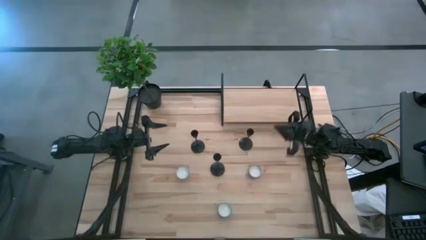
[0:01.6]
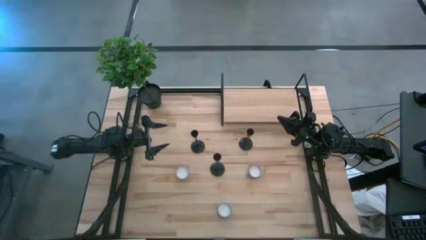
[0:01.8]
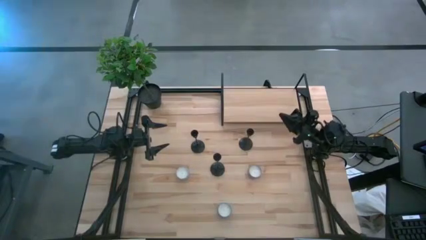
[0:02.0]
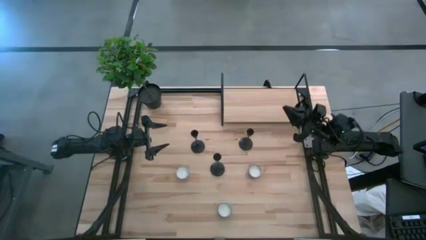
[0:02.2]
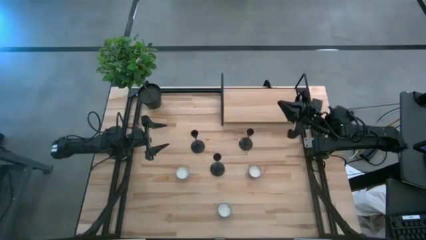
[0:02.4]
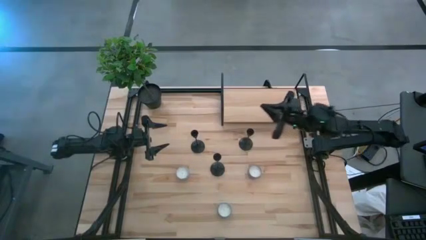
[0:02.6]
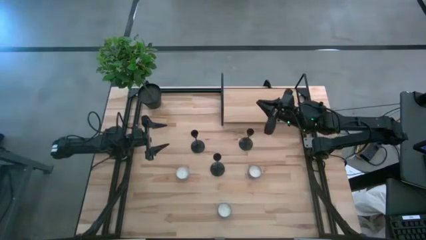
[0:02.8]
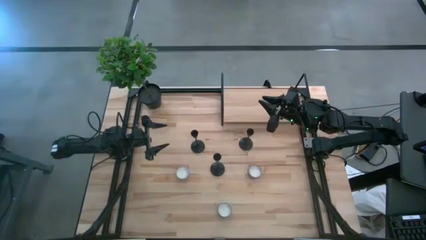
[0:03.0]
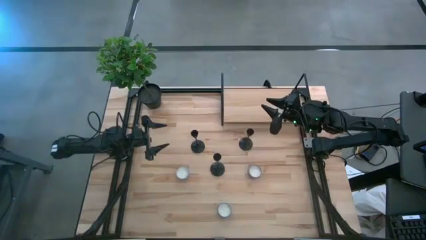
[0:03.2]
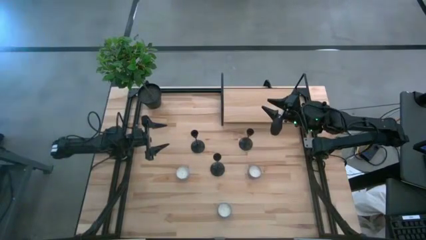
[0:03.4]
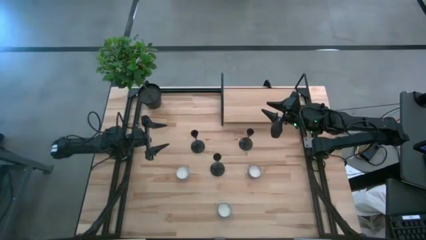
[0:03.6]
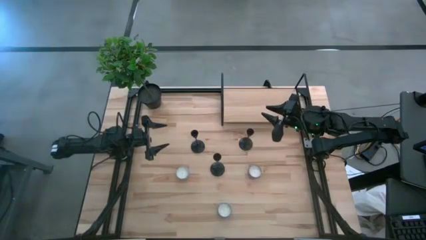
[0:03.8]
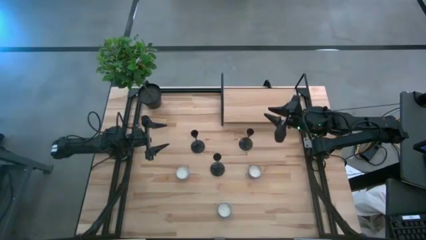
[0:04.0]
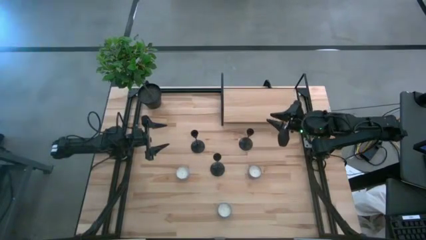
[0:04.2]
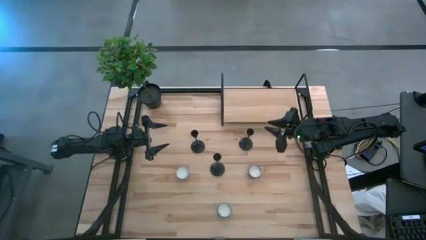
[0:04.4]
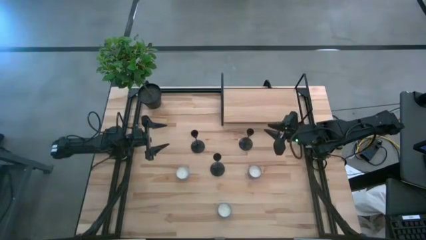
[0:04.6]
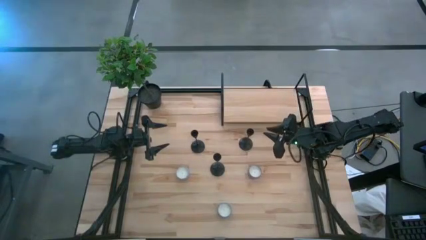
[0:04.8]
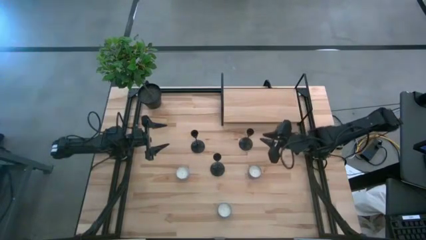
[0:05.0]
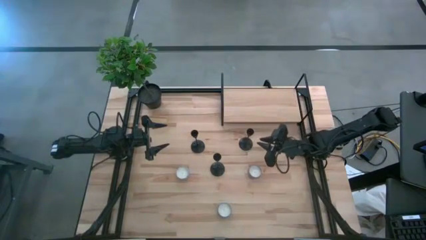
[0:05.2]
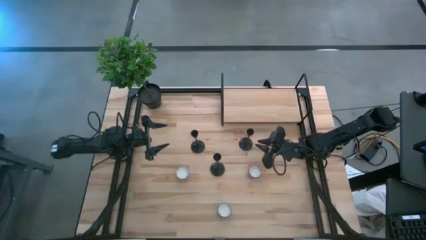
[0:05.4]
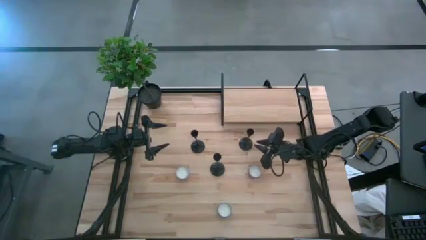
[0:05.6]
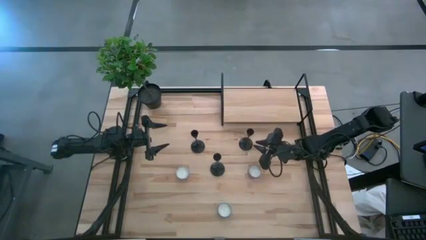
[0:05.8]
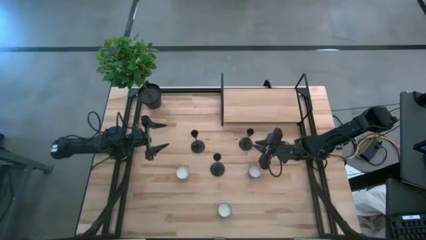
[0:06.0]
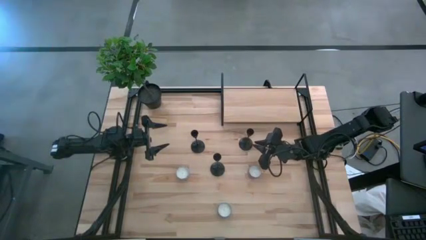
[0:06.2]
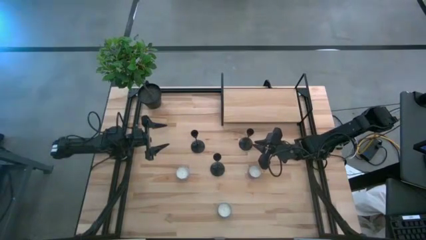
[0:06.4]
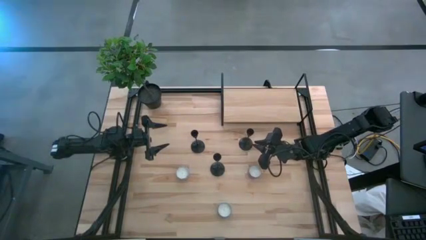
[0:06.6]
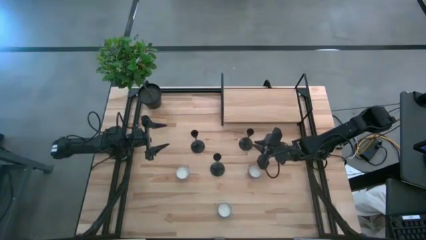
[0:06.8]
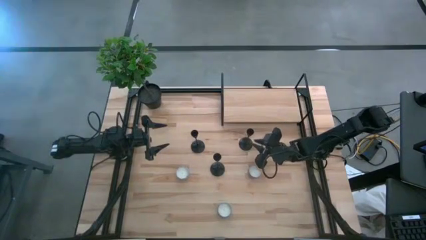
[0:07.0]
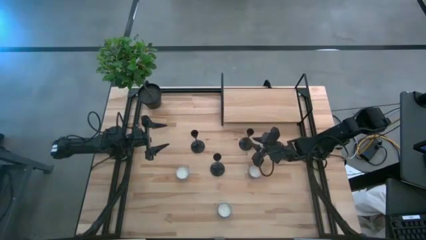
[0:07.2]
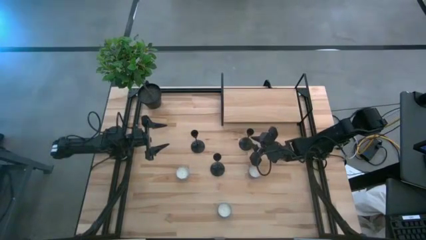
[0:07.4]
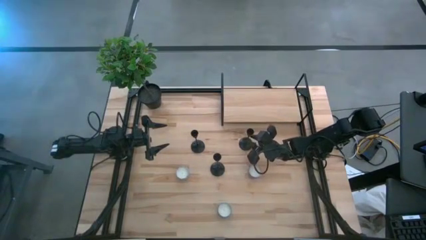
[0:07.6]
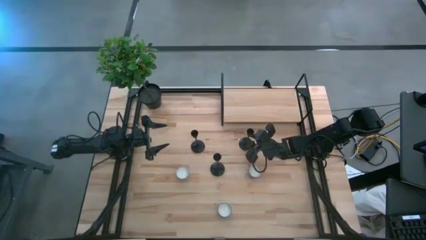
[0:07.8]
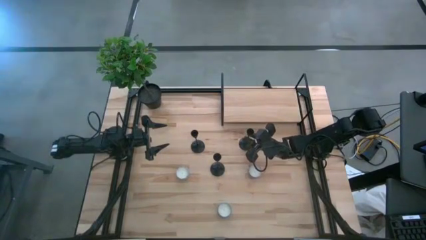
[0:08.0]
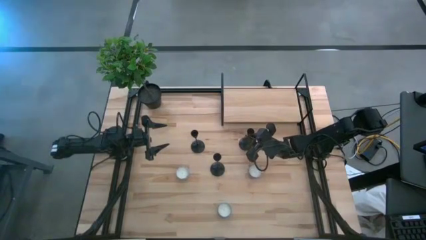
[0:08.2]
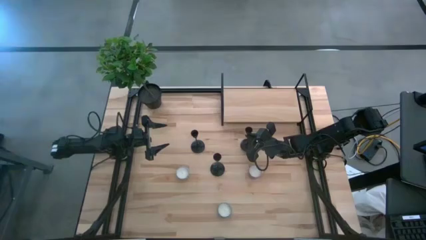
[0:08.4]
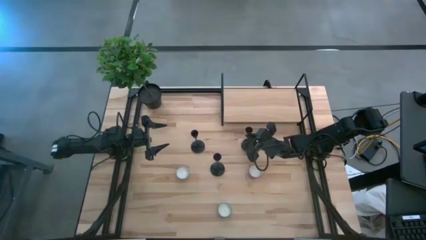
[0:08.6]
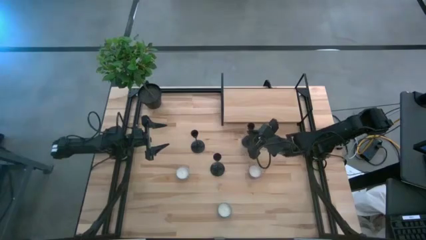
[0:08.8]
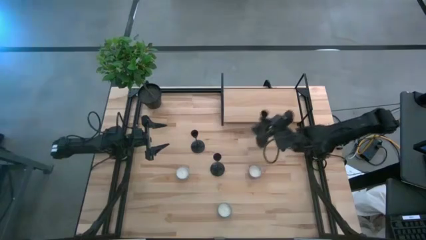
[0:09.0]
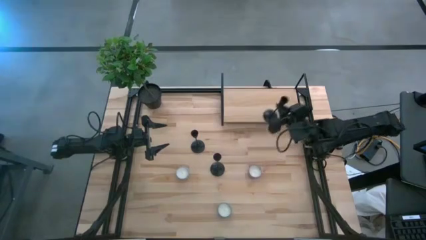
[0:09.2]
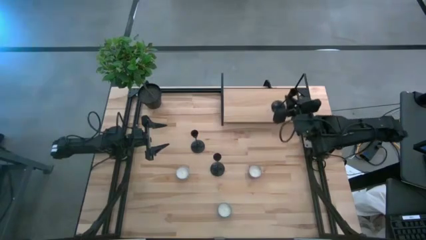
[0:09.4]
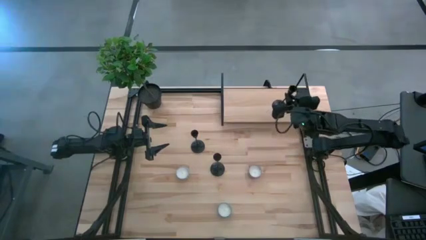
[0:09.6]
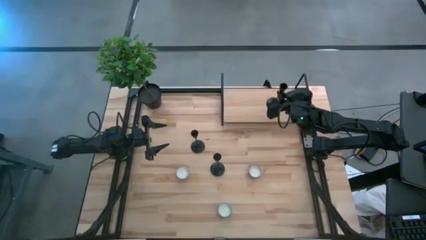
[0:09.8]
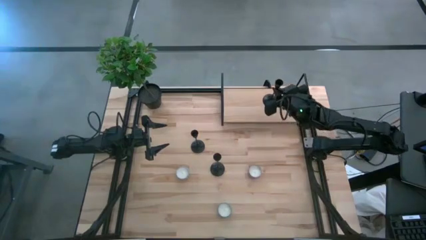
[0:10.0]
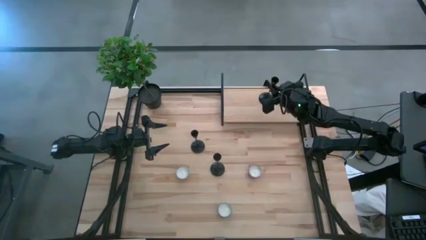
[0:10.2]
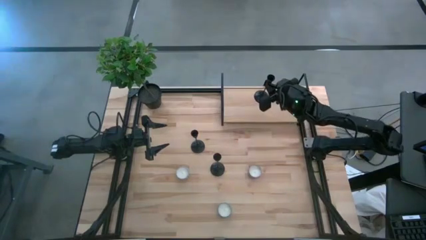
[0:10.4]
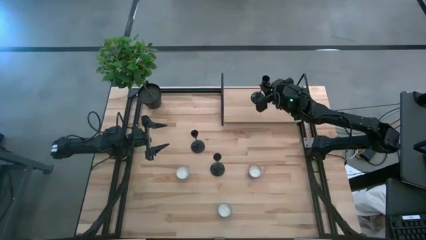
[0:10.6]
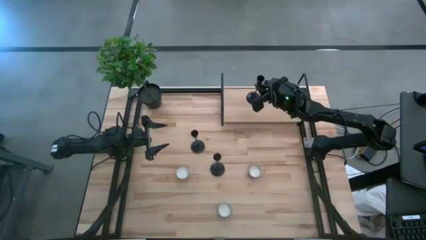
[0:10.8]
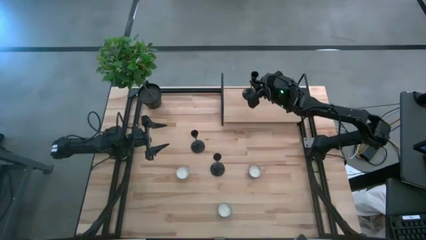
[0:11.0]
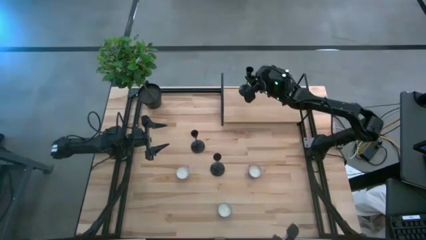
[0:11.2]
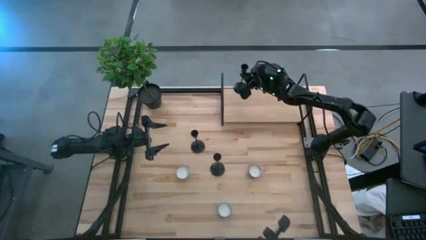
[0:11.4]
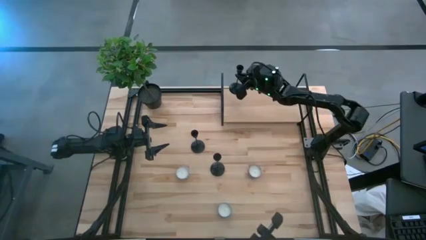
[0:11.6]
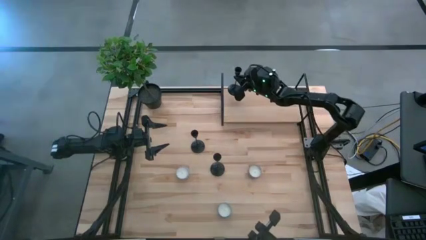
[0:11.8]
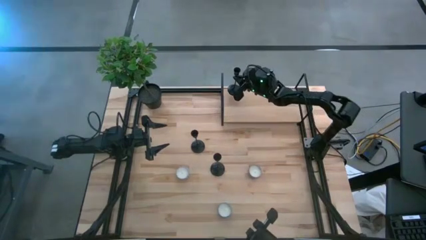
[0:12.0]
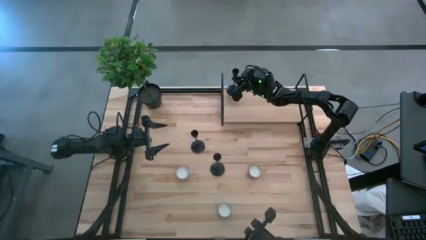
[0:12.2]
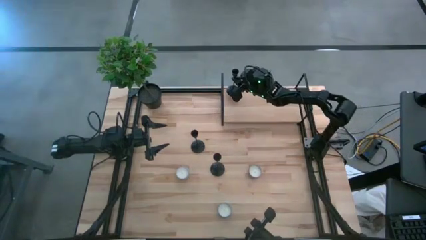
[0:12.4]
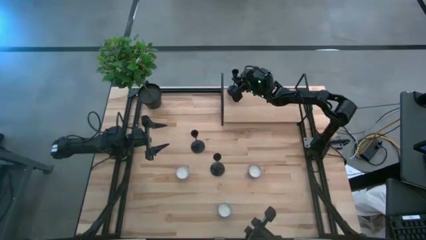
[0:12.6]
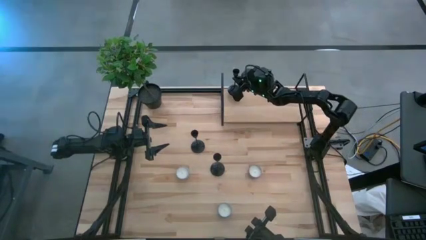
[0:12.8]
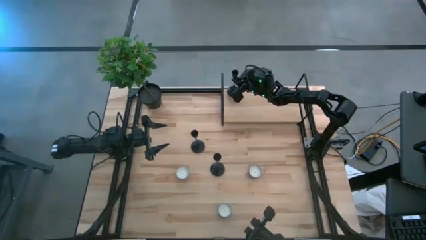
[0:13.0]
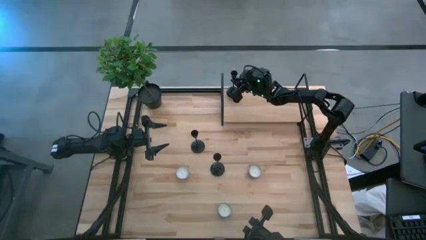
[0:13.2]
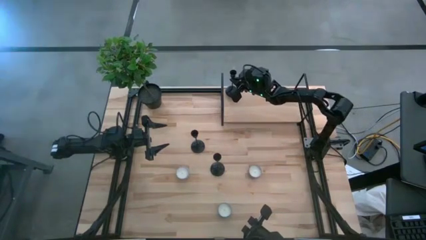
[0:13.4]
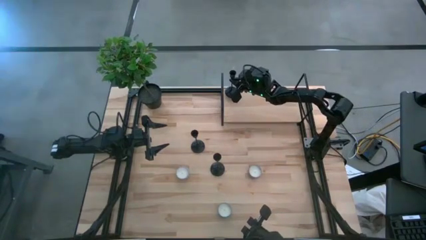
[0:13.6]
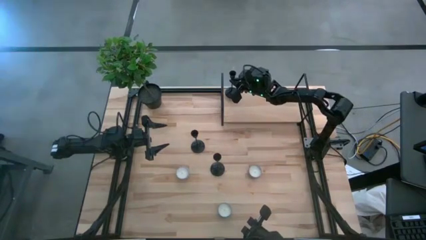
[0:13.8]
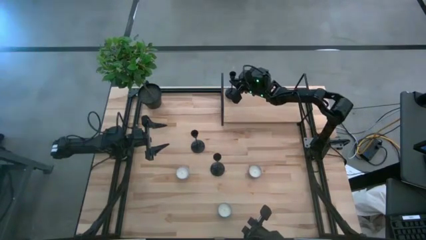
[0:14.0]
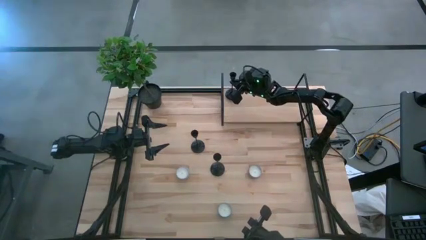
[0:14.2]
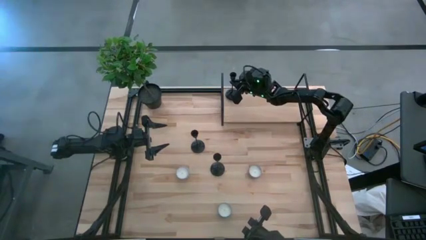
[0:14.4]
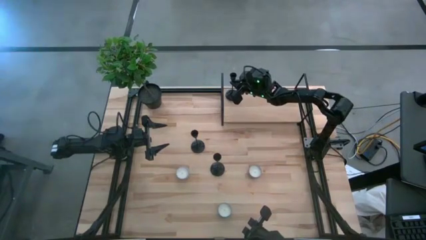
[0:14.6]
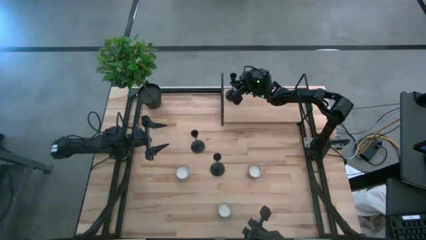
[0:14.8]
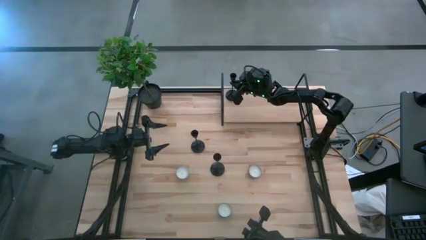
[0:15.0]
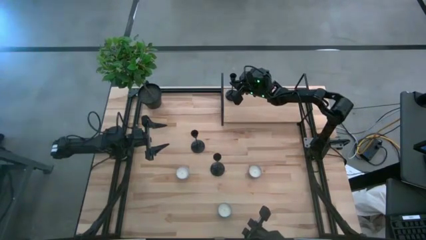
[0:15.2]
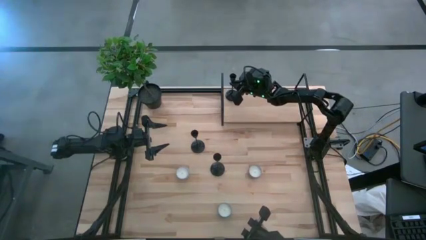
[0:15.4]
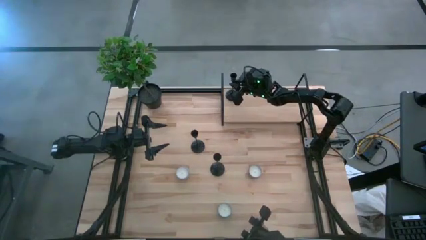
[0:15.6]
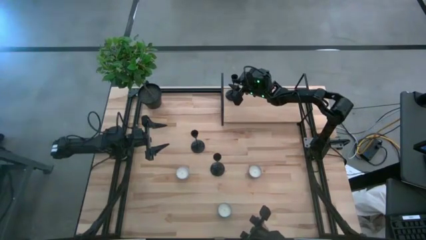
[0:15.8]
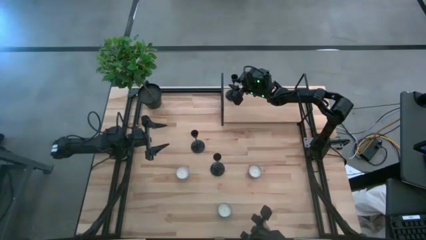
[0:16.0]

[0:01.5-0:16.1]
Task: Pick & Place candle stick holders
Put the top right black candle holder on the shelf
